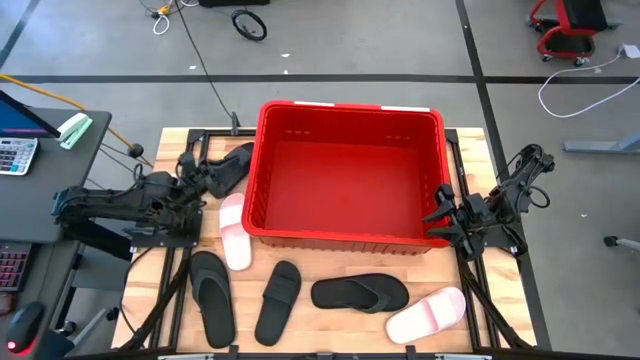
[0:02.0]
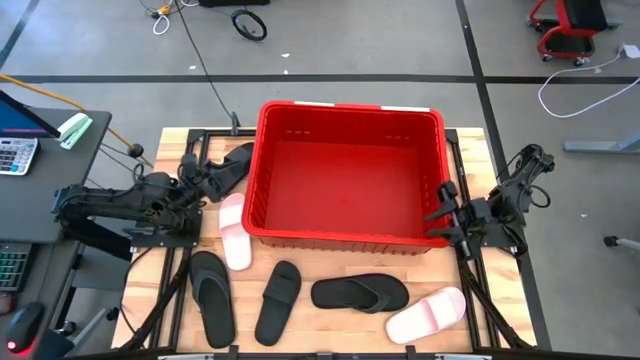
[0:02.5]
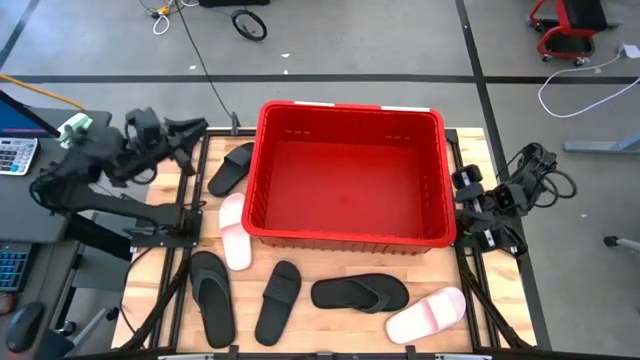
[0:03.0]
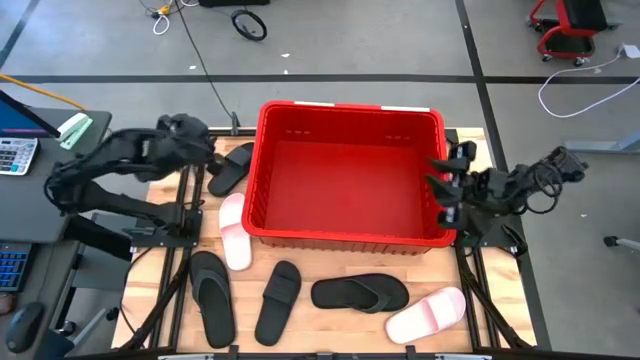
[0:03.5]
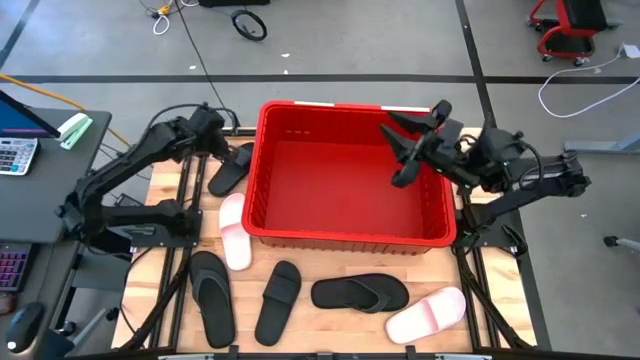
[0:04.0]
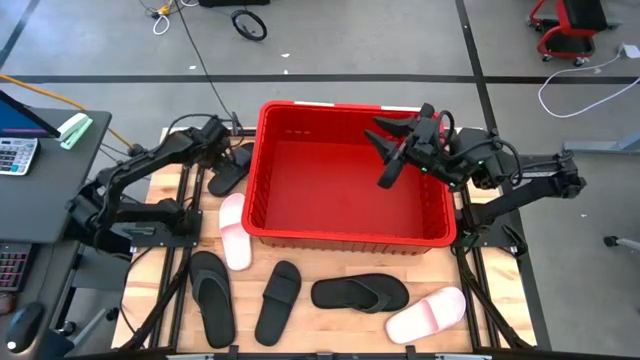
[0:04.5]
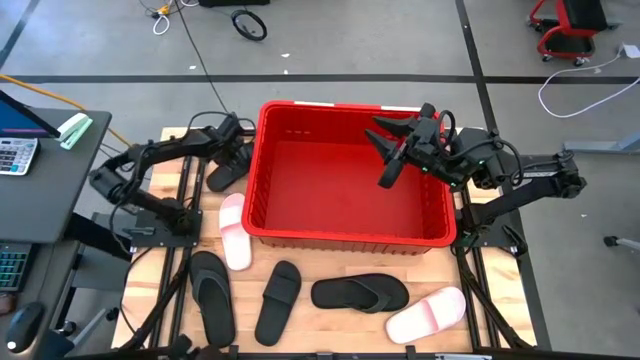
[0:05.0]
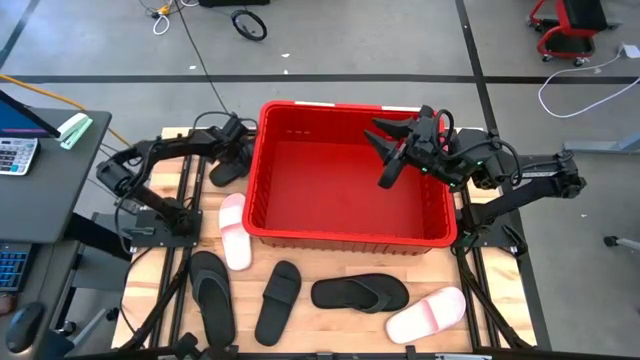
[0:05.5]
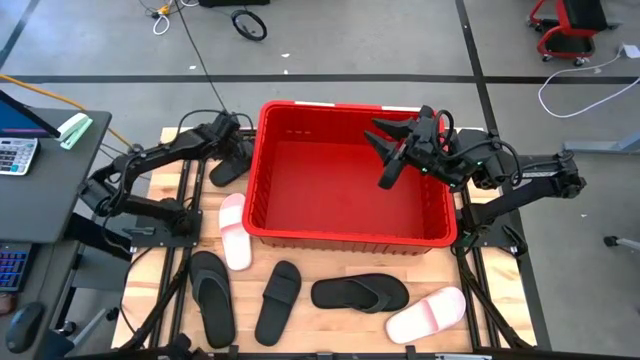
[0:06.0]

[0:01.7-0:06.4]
Task: Pick and place slides into bin
Put the top black slide into the red bin

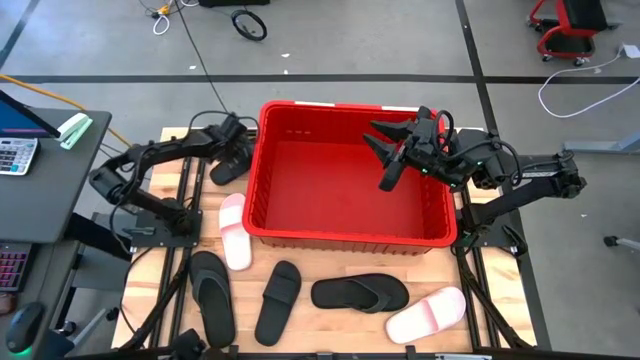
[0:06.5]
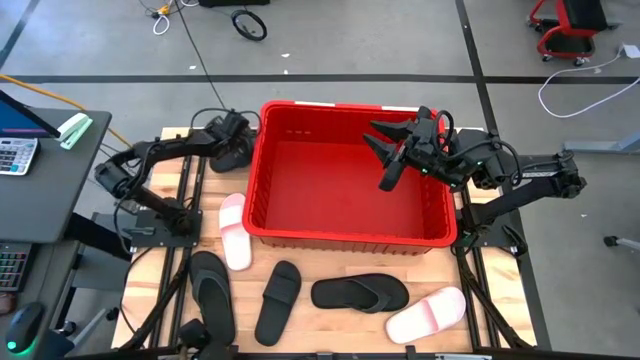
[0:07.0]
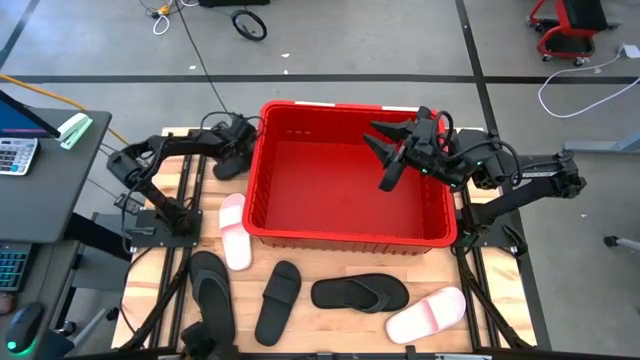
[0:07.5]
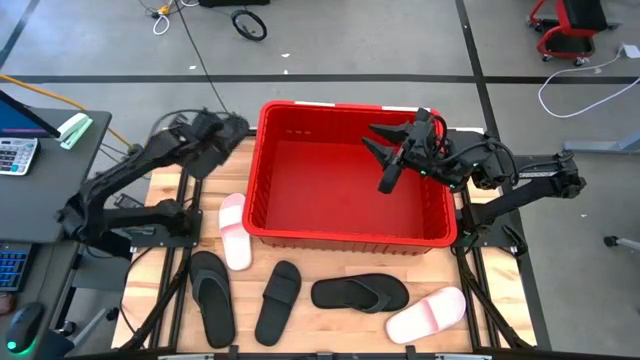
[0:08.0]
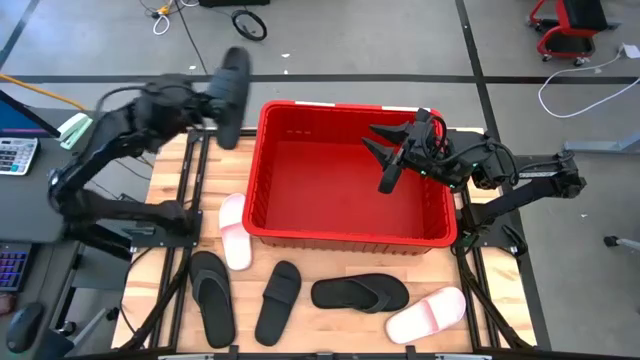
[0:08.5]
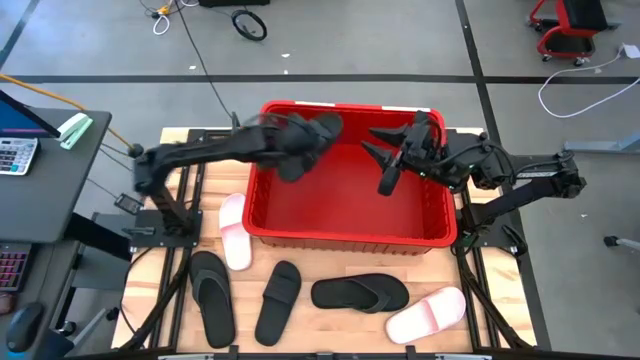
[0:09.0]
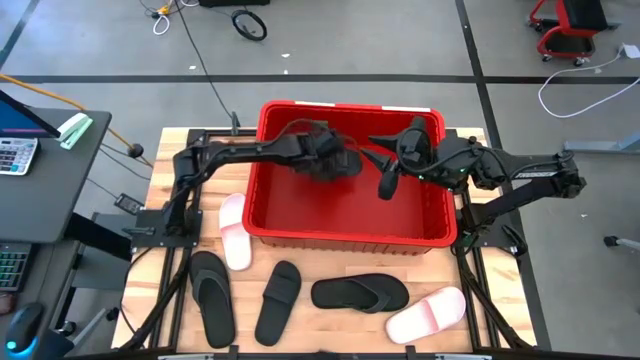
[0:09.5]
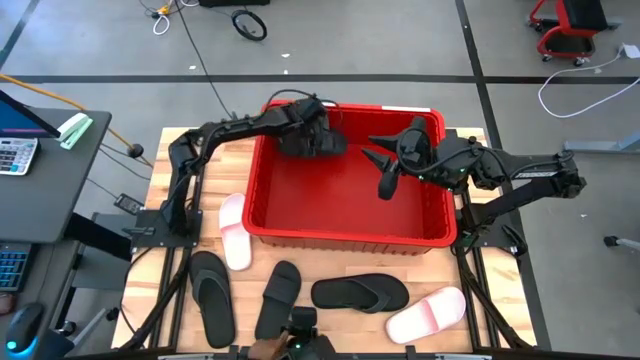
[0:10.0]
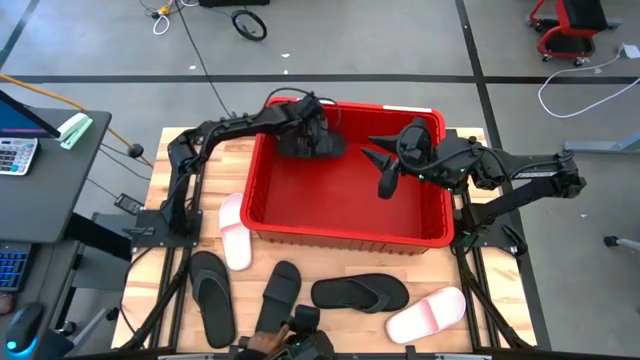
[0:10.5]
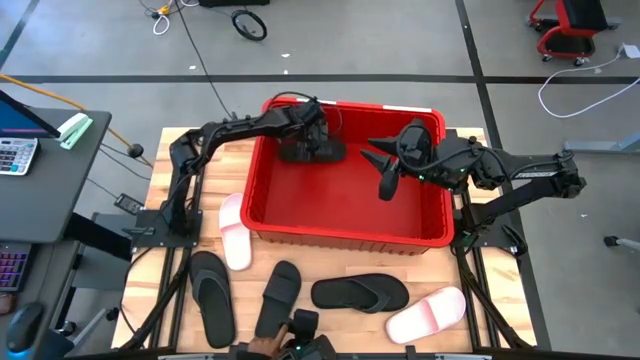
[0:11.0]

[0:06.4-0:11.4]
Put the top black slide into the red bin

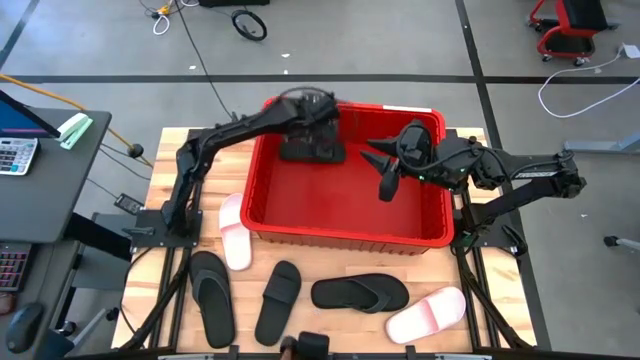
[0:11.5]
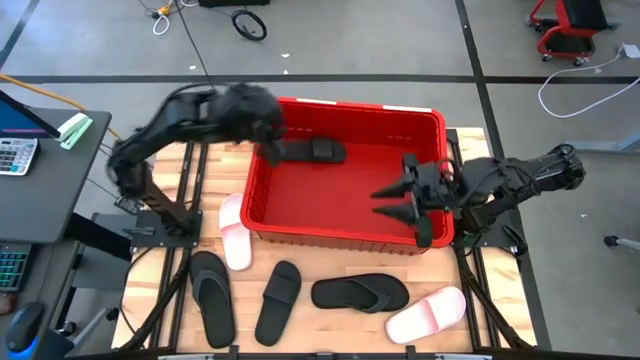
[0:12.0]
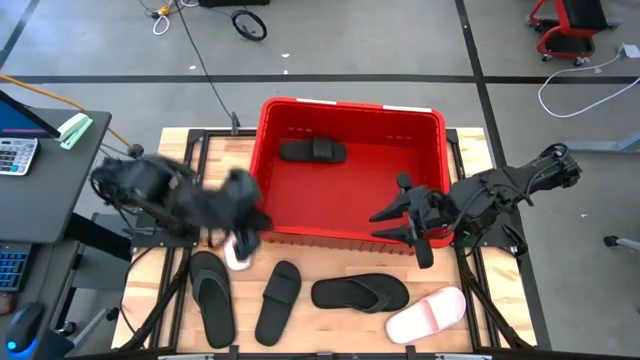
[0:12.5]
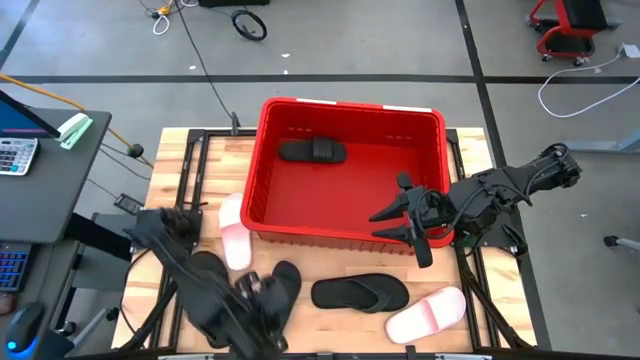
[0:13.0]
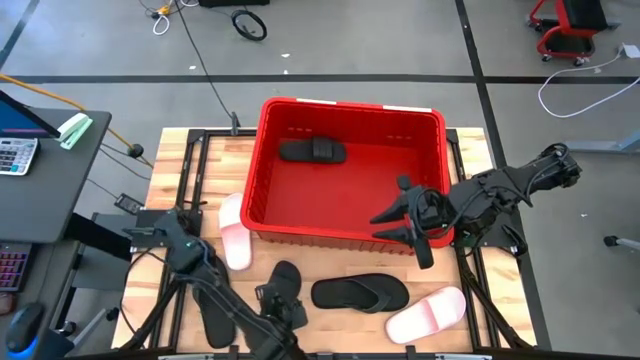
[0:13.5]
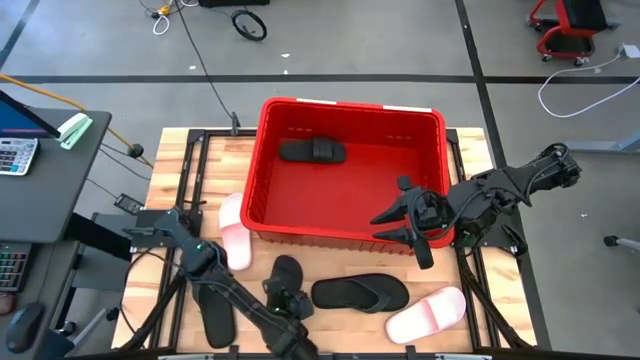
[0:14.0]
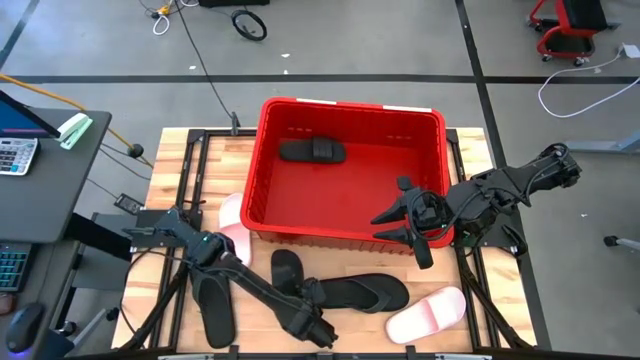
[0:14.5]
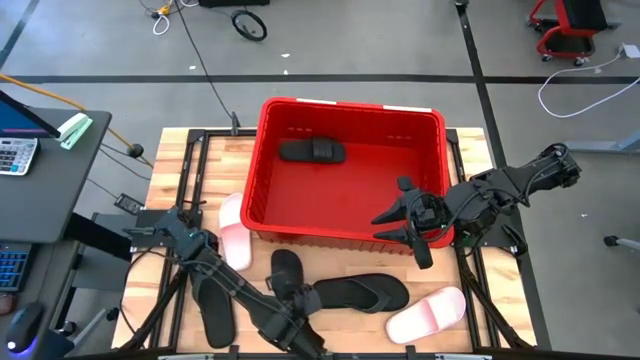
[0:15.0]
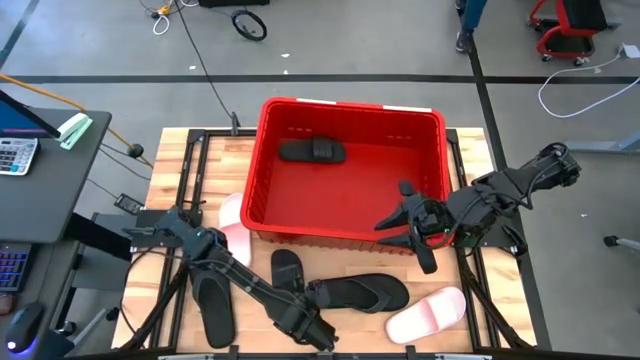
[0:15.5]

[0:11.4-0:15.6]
Put the black slide into the red bin

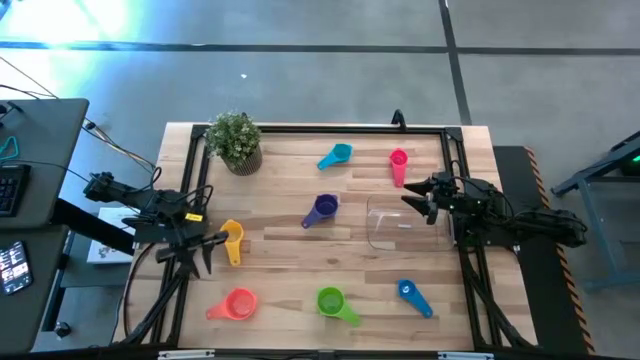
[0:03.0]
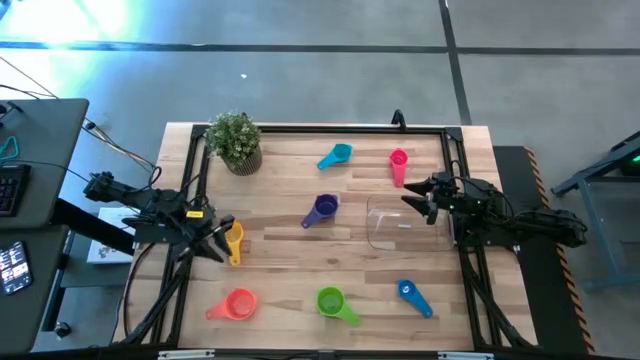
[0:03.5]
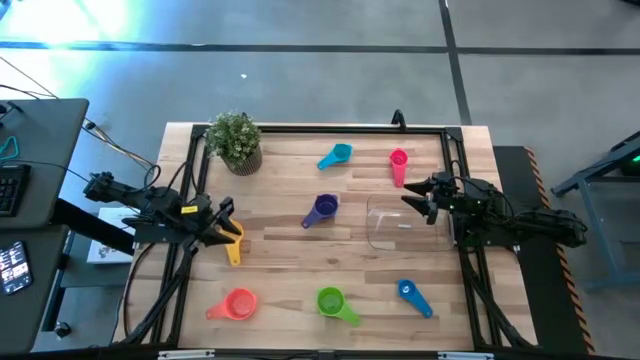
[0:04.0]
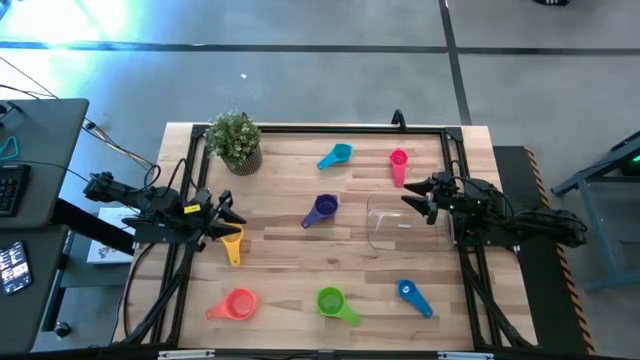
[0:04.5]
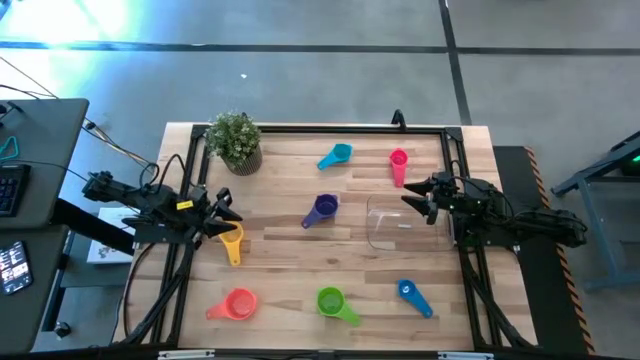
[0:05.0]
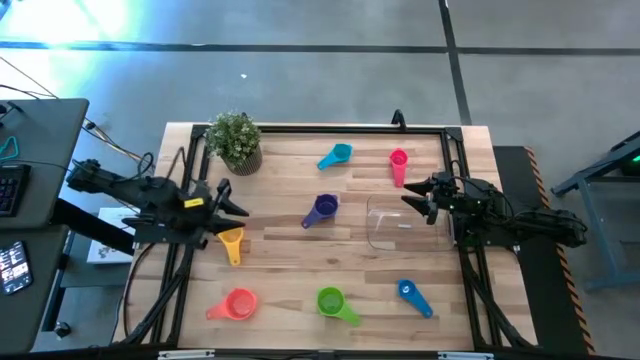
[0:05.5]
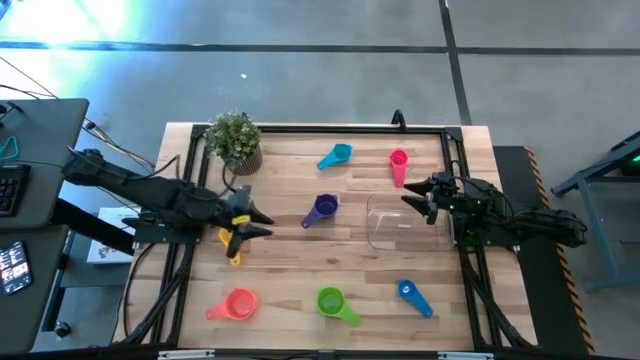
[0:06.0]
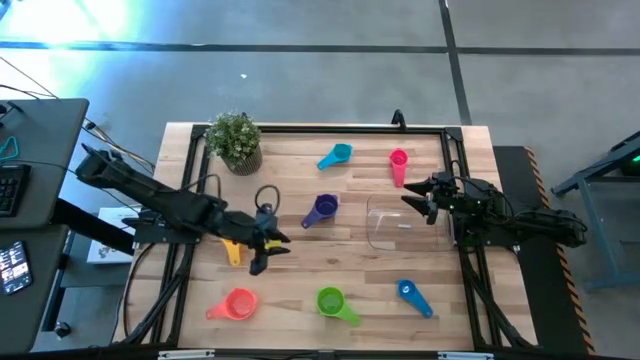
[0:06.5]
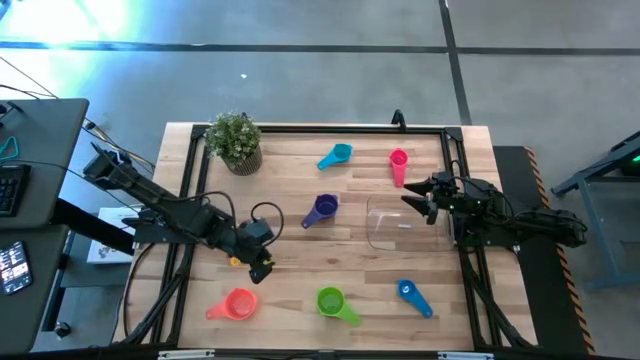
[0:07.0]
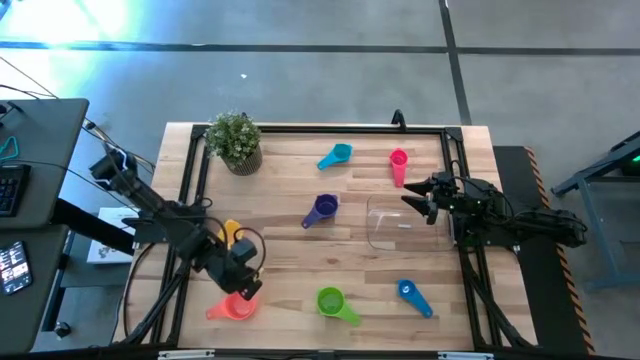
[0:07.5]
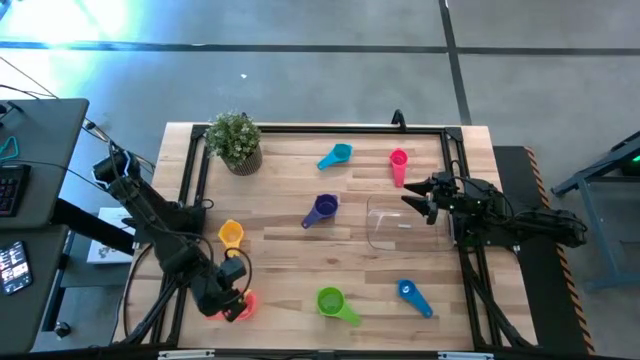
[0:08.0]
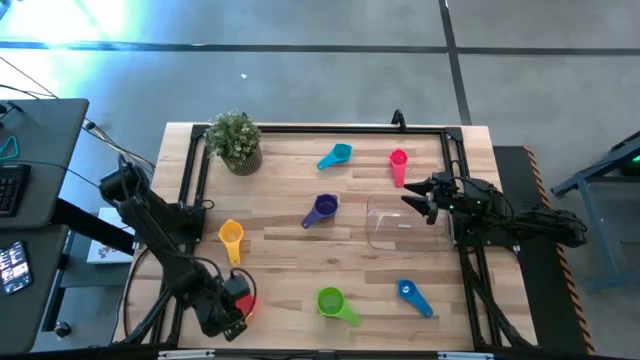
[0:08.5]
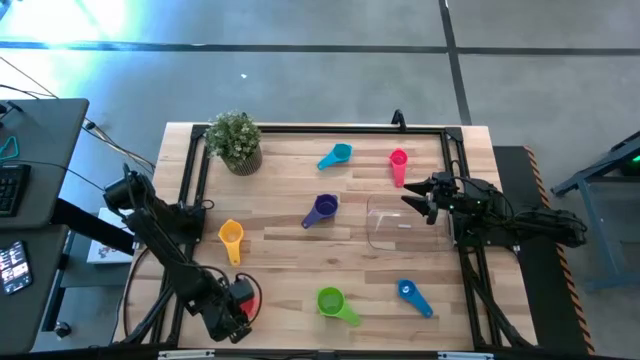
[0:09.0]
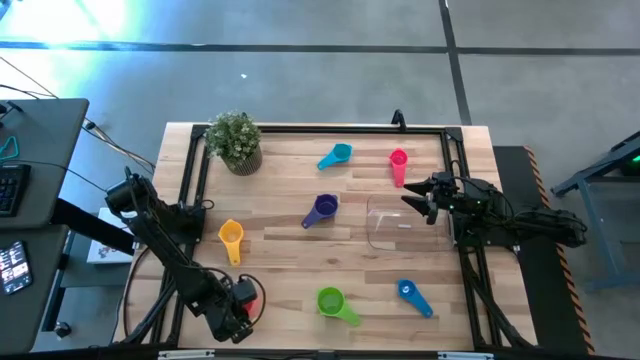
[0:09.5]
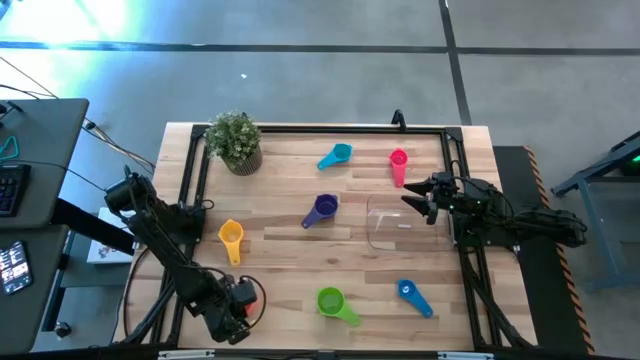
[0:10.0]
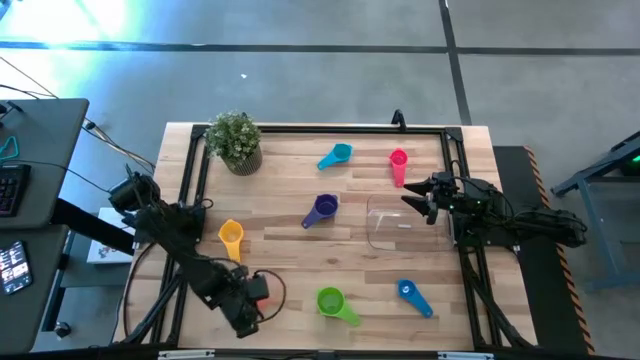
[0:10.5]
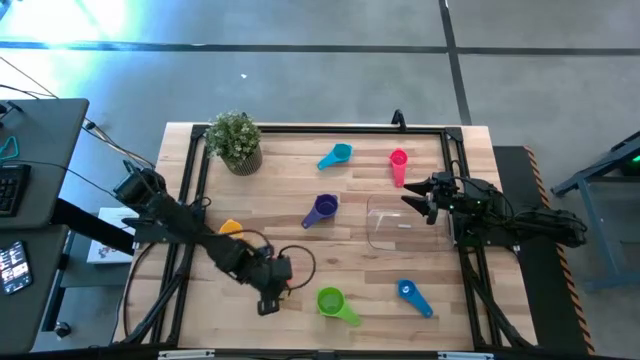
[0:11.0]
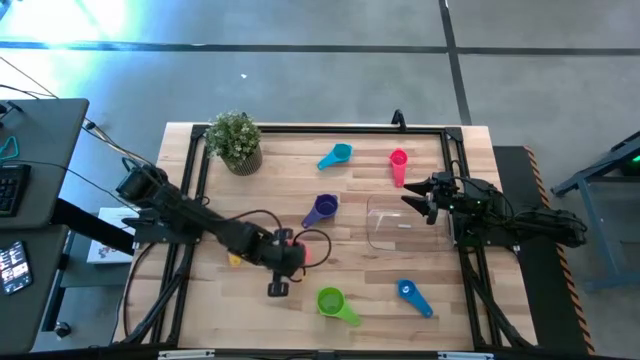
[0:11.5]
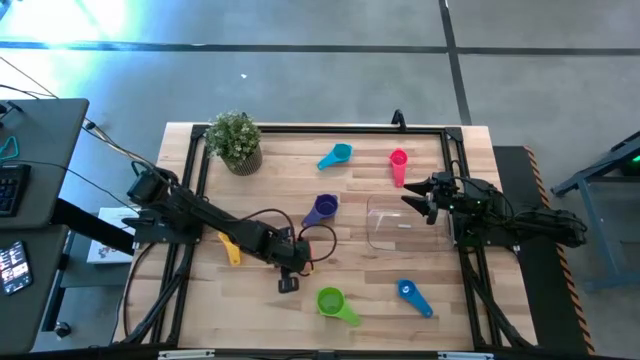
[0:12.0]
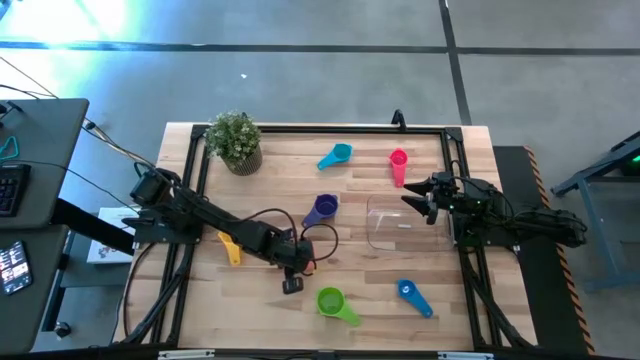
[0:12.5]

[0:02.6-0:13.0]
Task: Nest measuring cups in basket
Move the orange measuring cup to the center of the table
